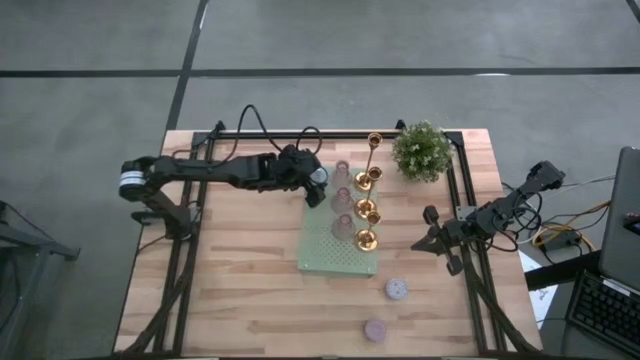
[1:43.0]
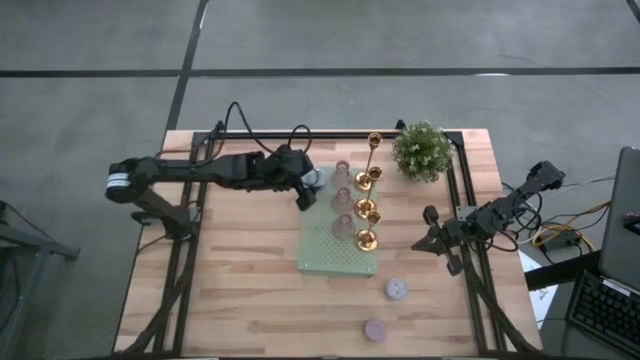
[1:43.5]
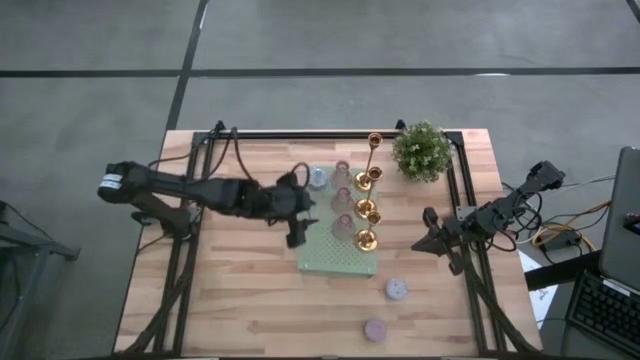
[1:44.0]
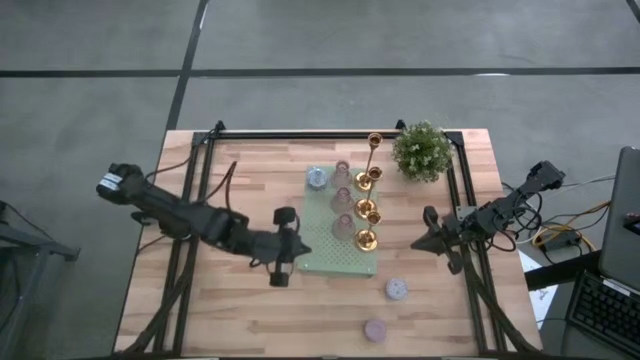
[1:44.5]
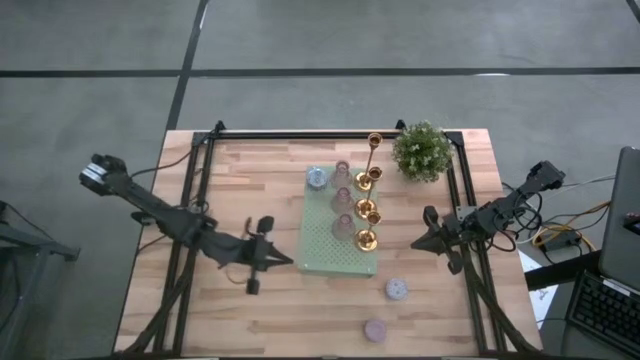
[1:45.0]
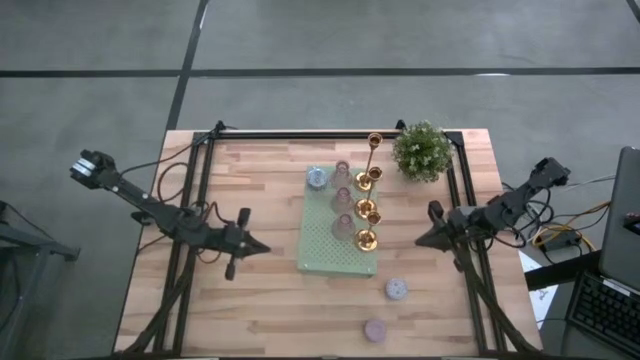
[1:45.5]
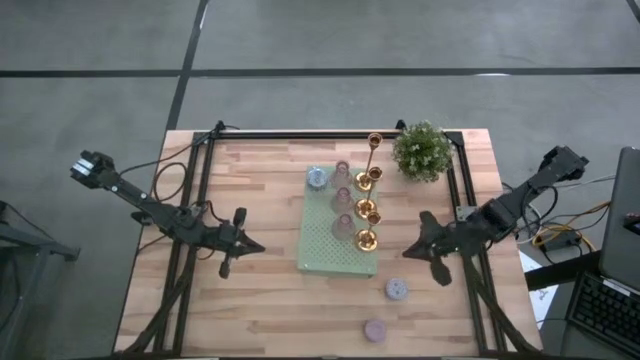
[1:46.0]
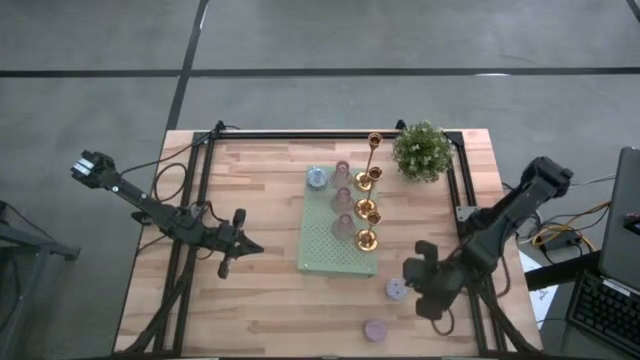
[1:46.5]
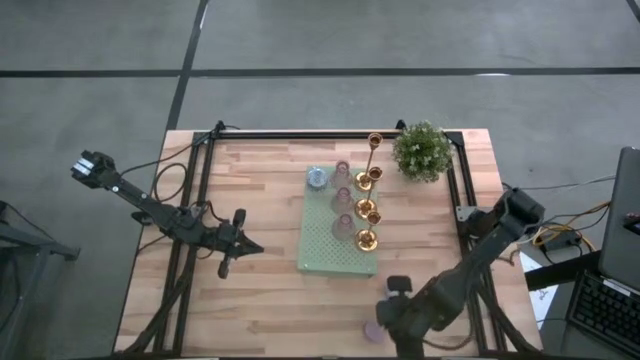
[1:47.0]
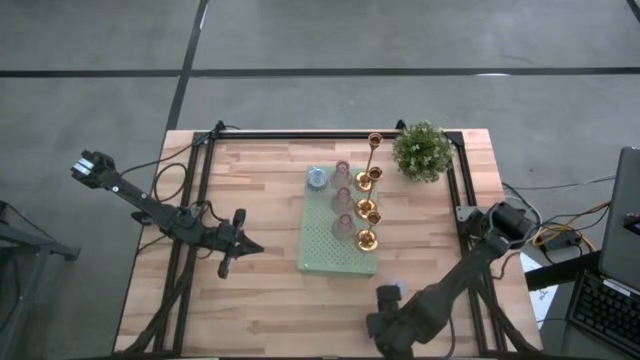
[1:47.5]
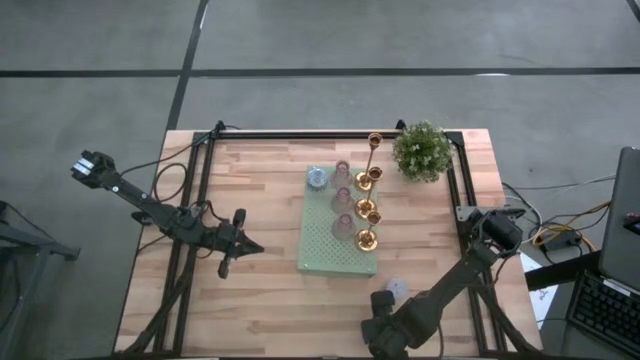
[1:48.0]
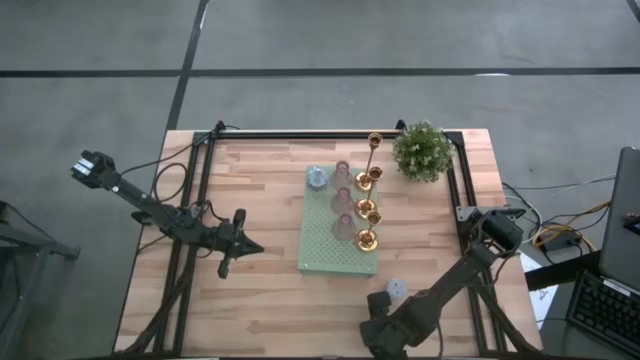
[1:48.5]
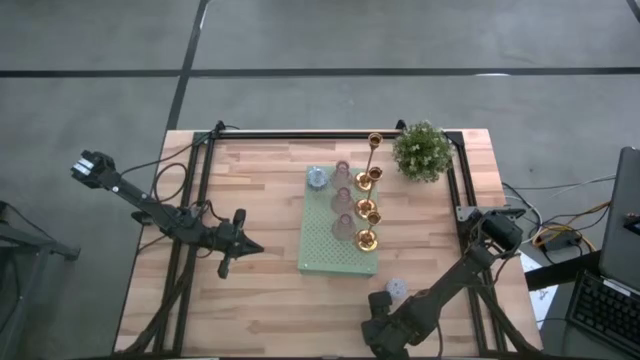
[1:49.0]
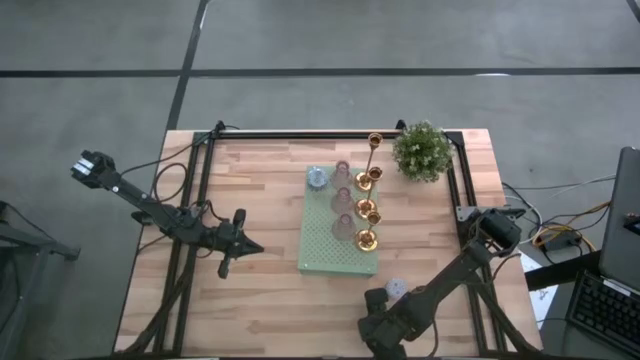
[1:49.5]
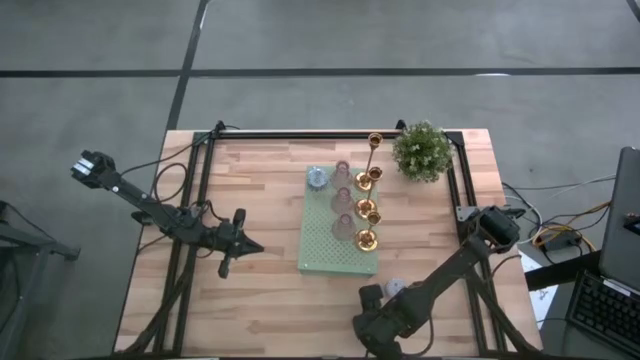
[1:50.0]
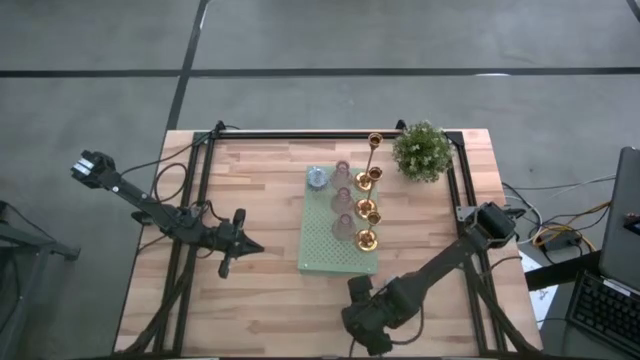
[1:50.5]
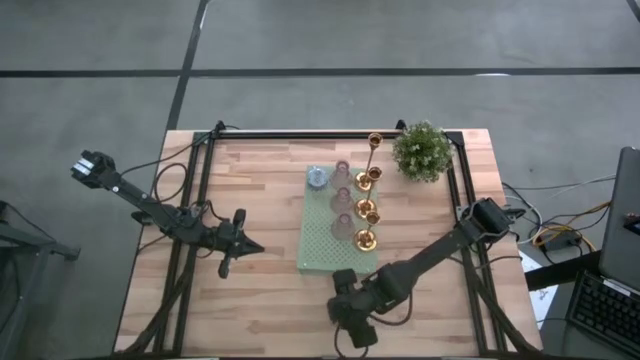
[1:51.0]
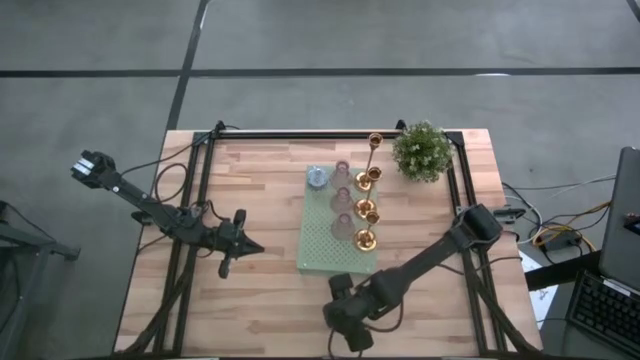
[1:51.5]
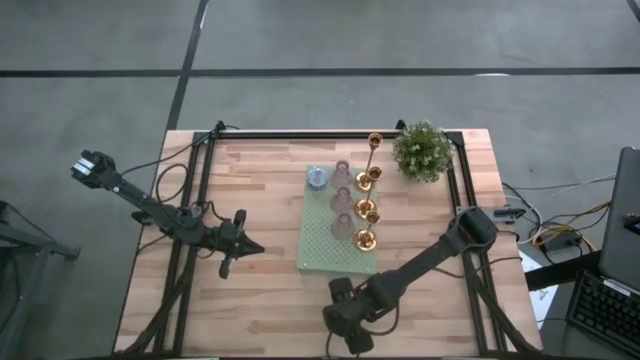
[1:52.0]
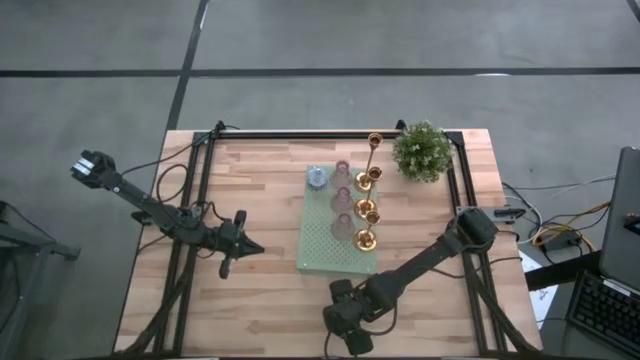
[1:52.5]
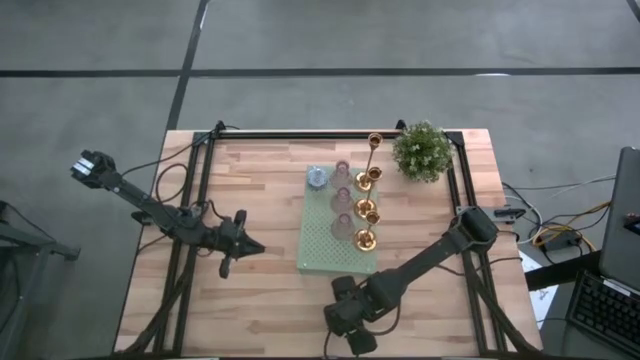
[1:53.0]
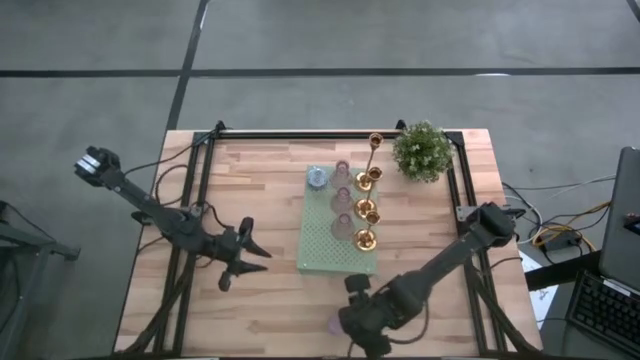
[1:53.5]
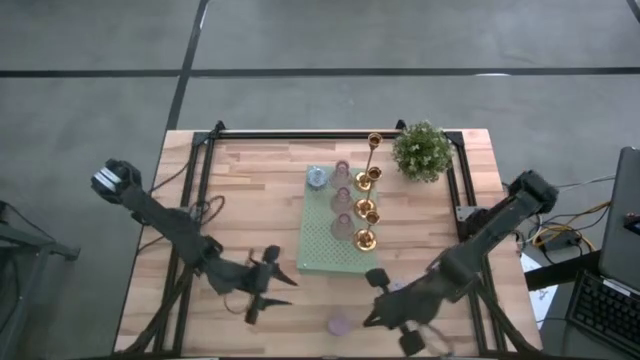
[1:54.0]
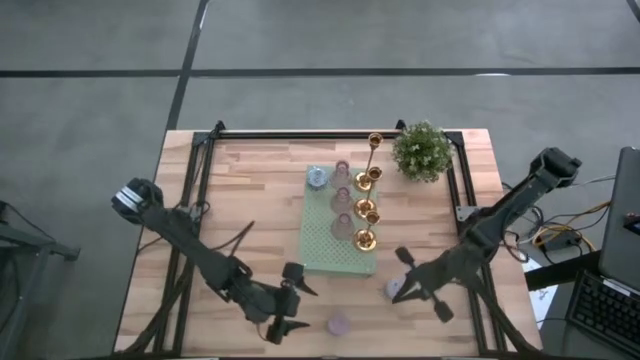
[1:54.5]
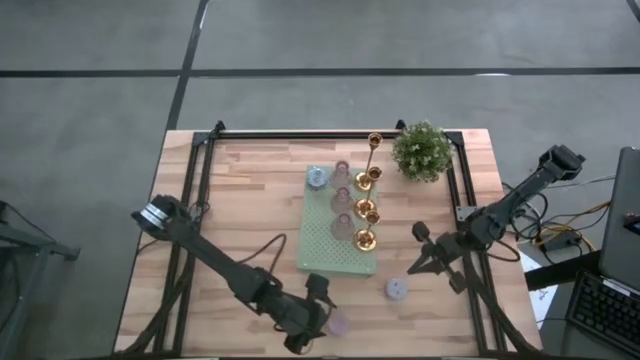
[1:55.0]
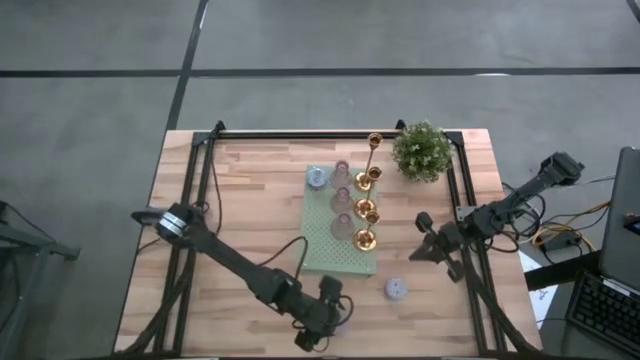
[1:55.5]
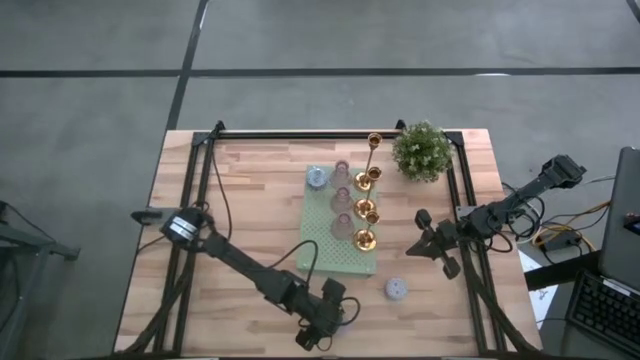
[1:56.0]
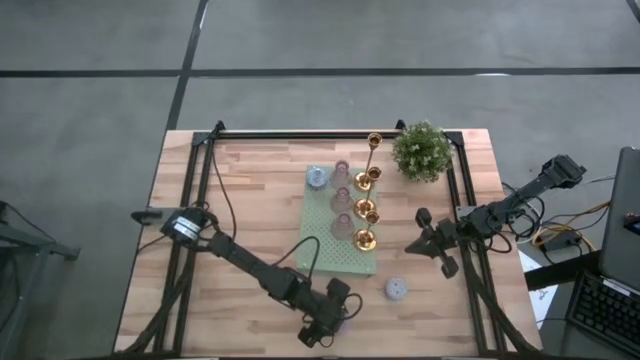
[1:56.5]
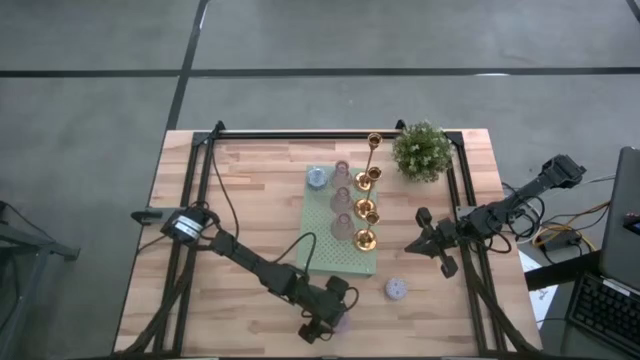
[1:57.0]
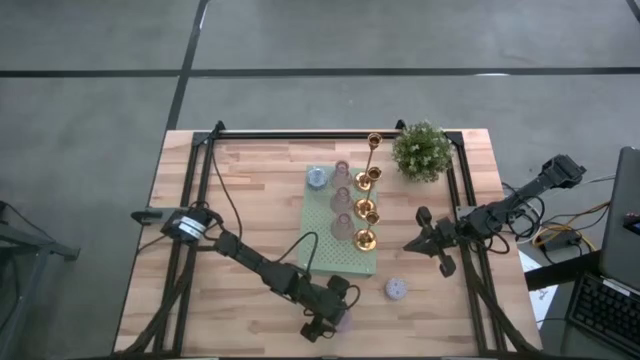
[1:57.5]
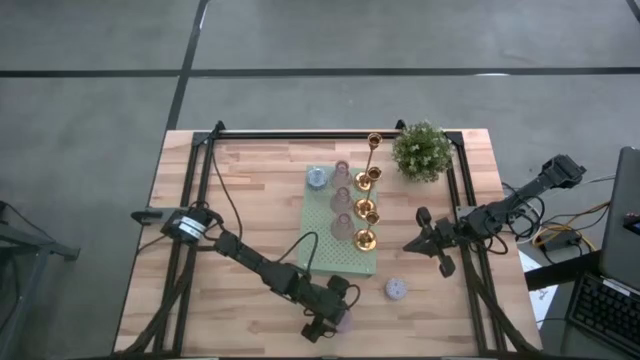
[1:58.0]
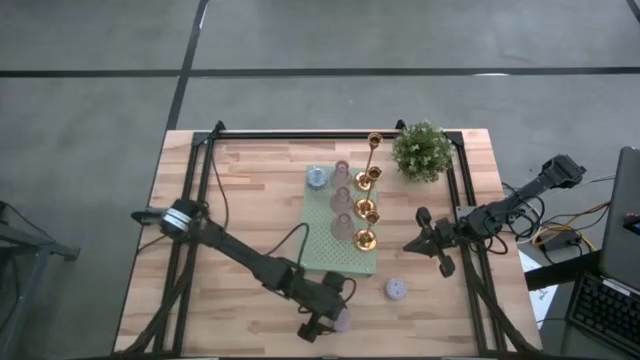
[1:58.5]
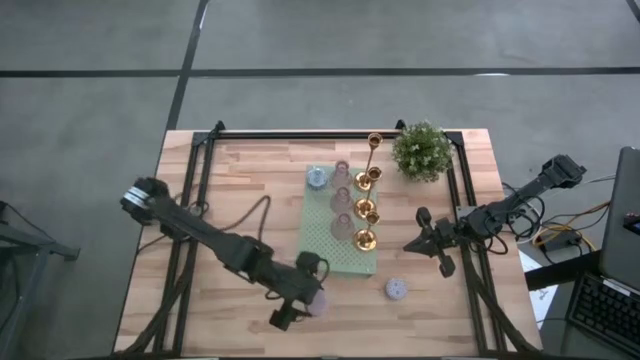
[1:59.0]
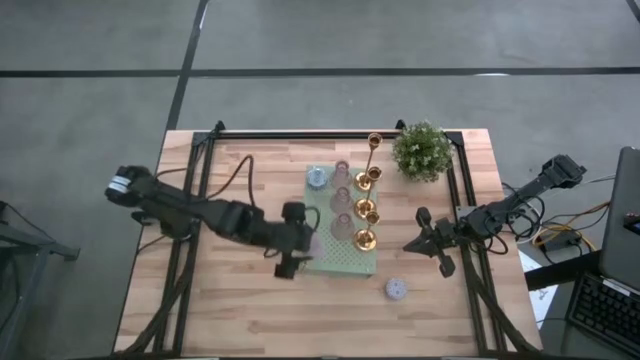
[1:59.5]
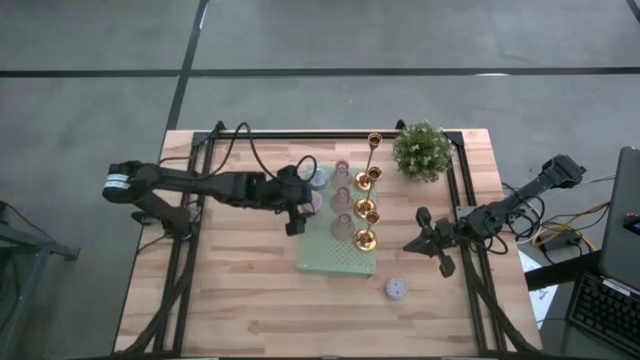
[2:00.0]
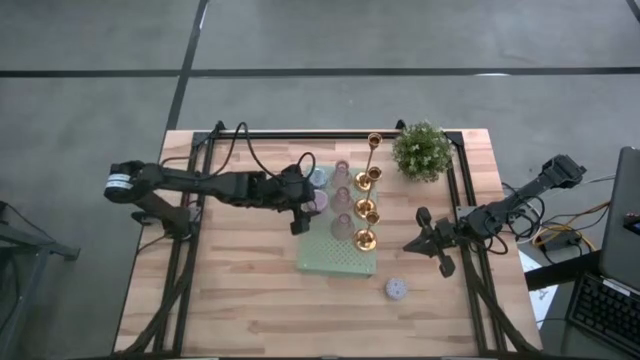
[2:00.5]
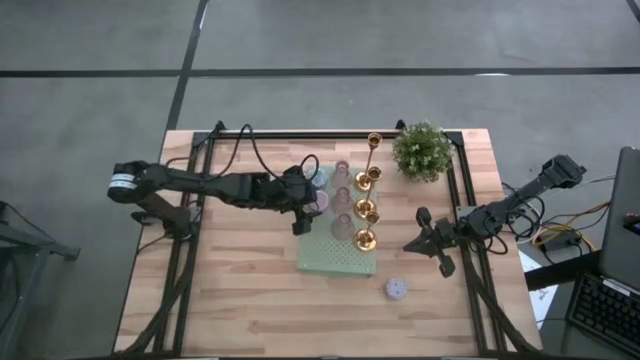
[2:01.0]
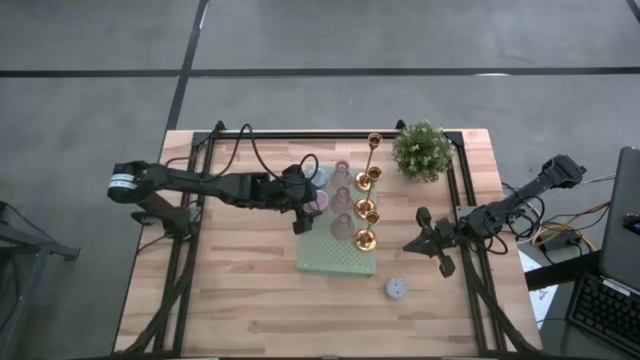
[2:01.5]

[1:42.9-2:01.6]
Task: Pick & Place candle stick holders
Put the purple patterned scented candle on the shelf aligned with the other blue patterned scented candle

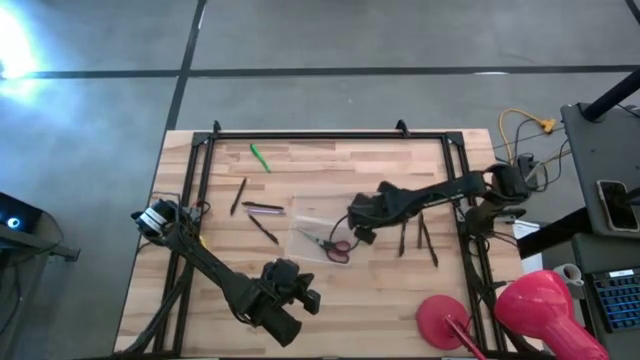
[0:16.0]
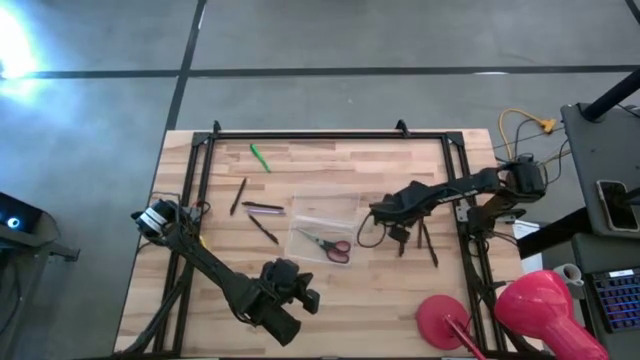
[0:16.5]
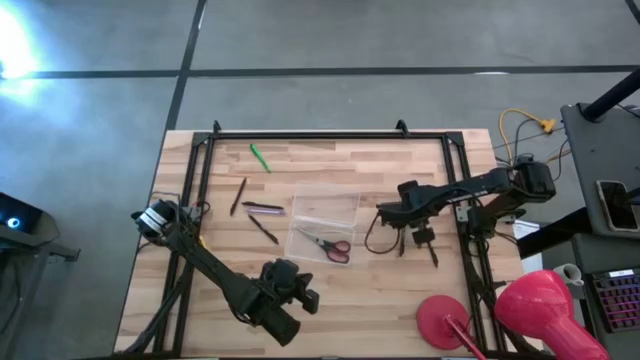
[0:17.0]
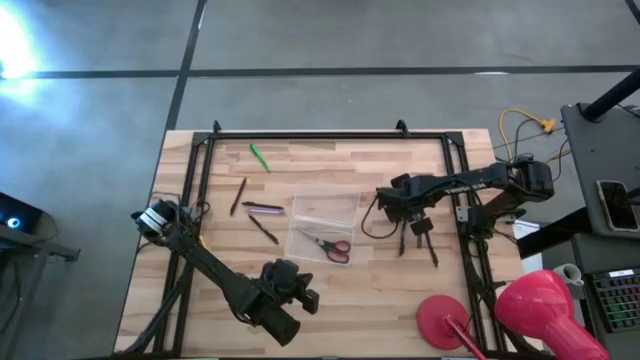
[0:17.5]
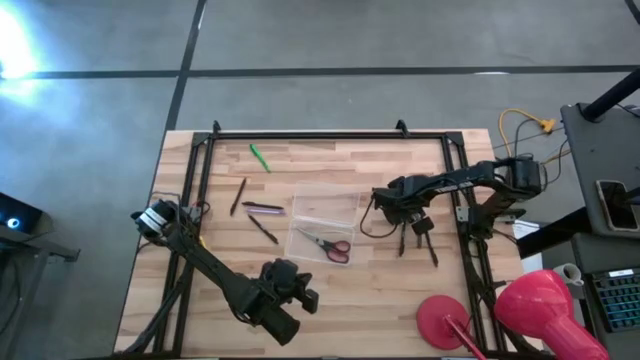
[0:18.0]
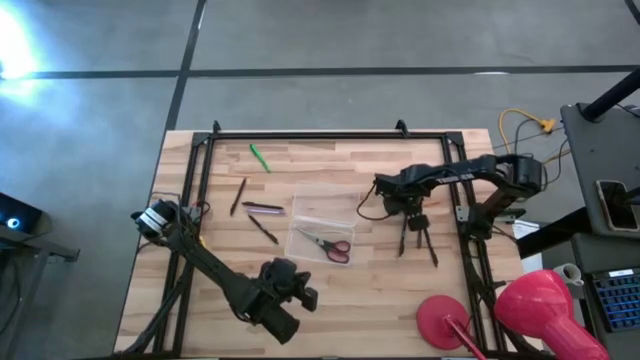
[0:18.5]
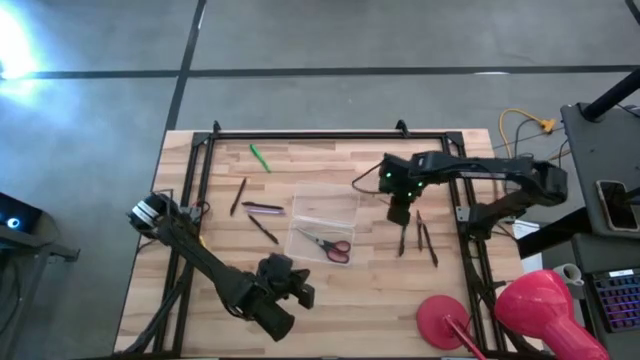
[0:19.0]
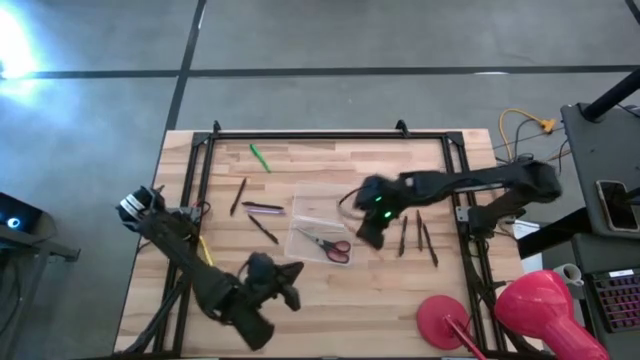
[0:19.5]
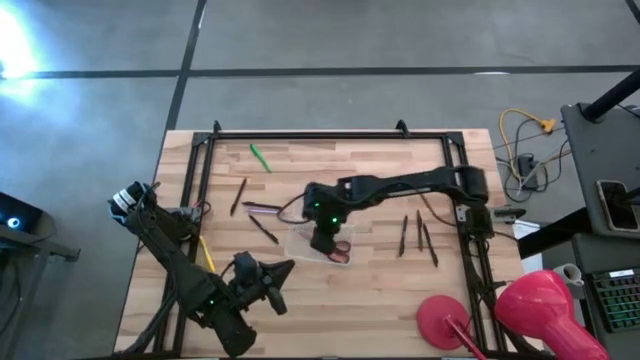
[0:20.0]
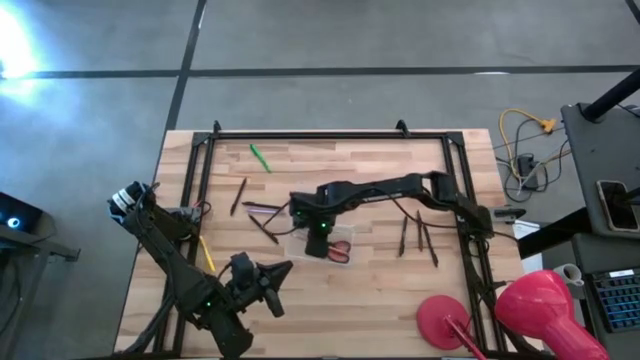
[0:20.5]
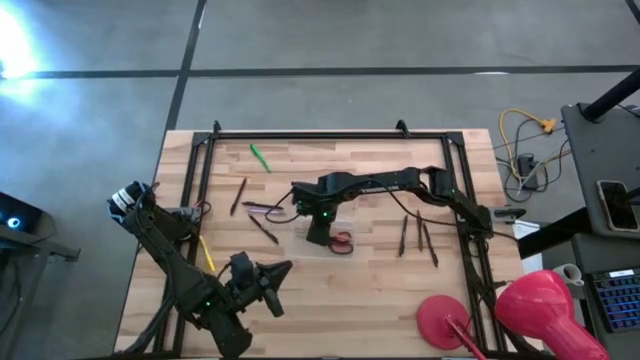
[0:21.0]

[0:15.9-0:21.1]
Task: Pick & place school supplies into a supply box
Put the orange pencil into the transparent supply box
